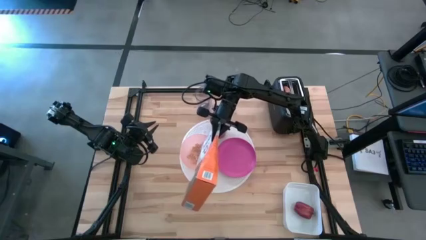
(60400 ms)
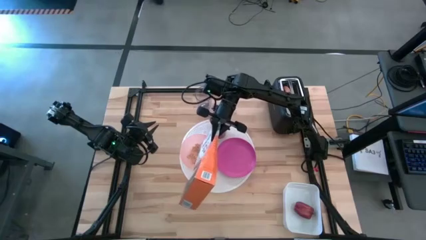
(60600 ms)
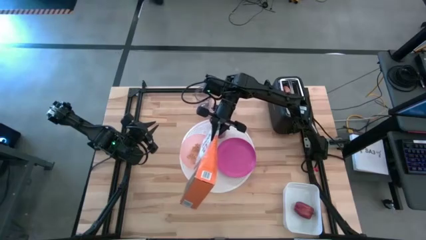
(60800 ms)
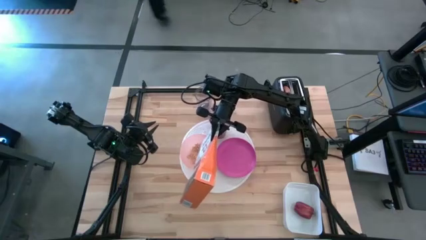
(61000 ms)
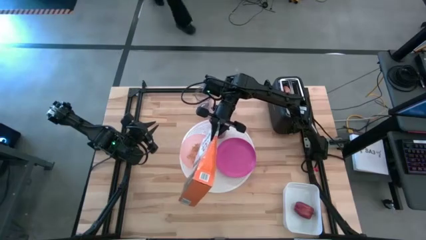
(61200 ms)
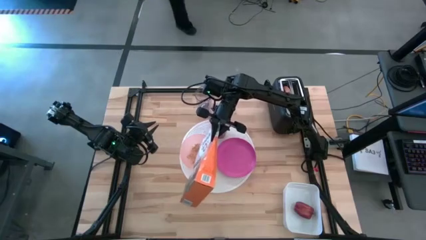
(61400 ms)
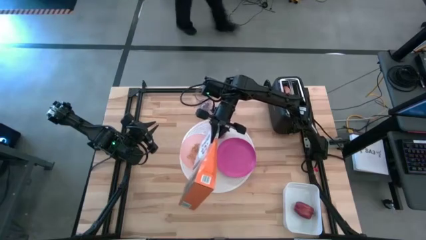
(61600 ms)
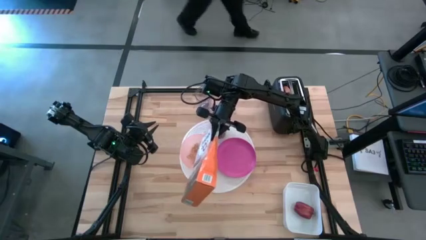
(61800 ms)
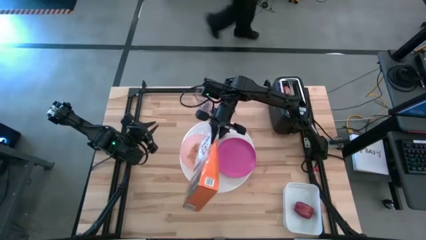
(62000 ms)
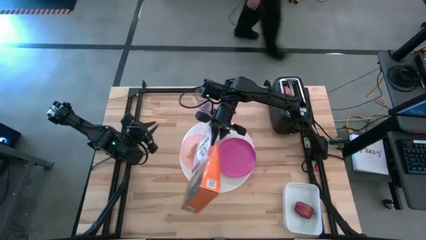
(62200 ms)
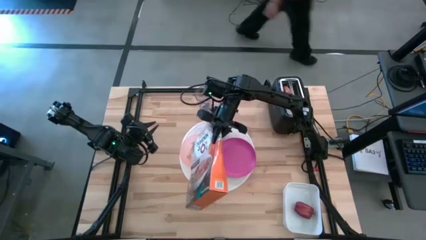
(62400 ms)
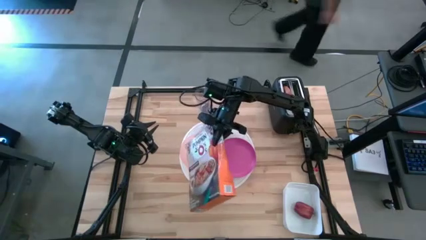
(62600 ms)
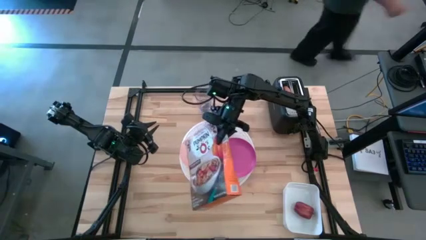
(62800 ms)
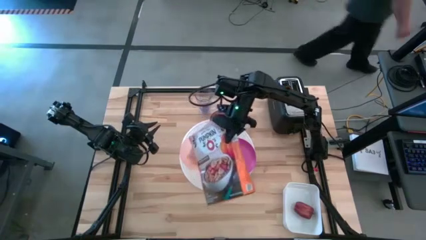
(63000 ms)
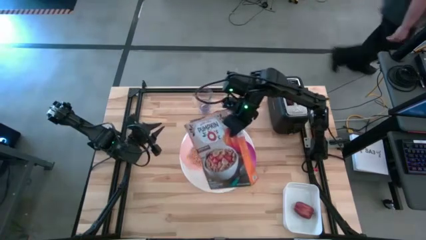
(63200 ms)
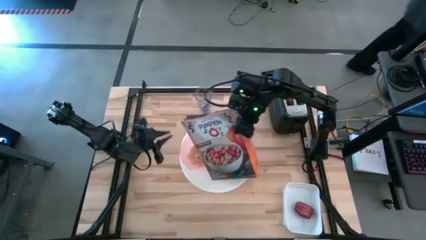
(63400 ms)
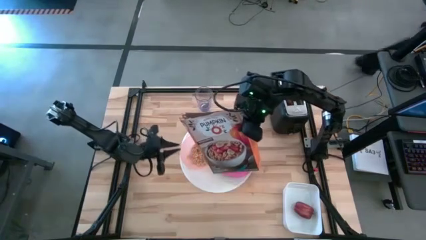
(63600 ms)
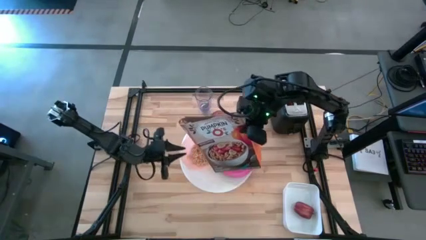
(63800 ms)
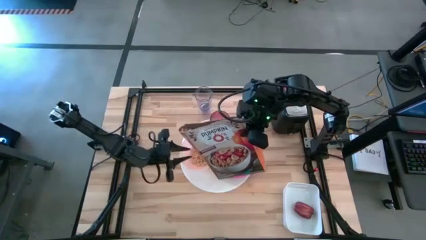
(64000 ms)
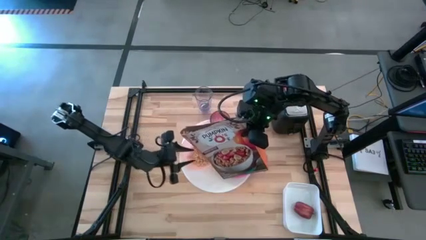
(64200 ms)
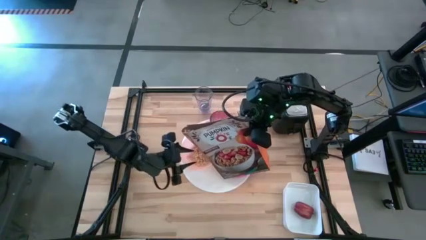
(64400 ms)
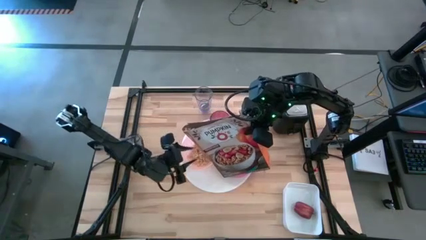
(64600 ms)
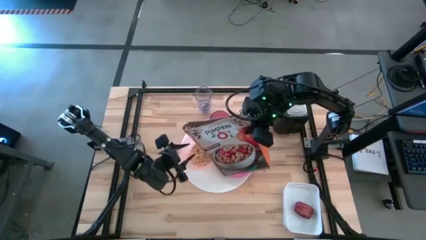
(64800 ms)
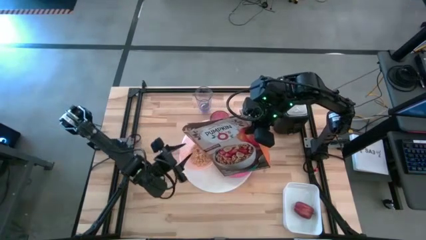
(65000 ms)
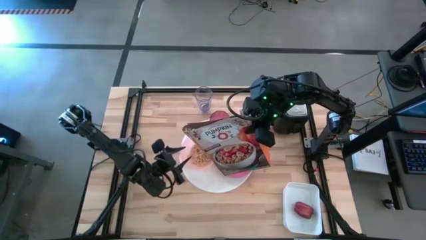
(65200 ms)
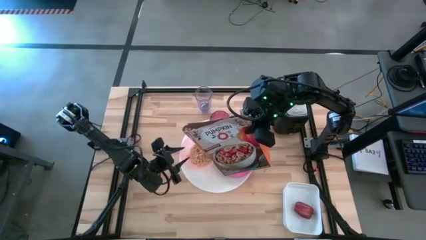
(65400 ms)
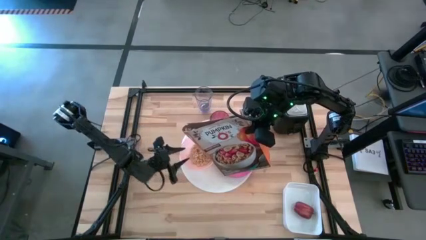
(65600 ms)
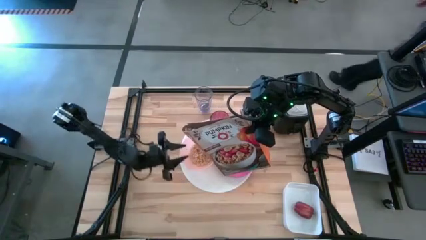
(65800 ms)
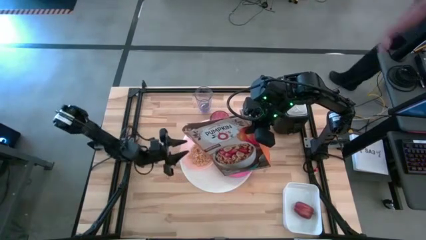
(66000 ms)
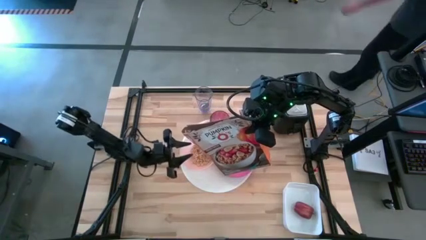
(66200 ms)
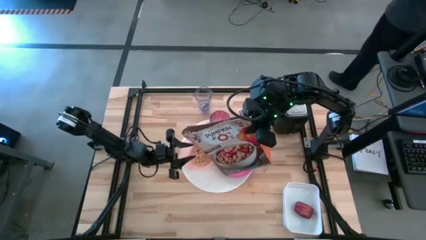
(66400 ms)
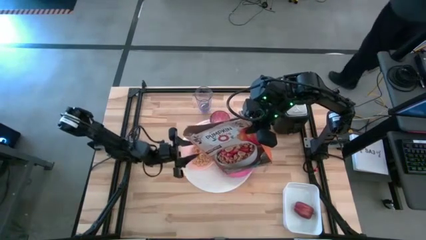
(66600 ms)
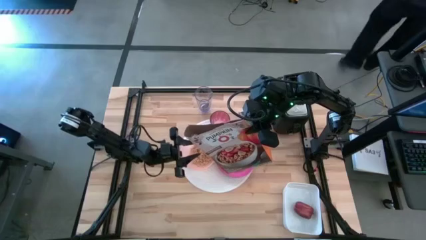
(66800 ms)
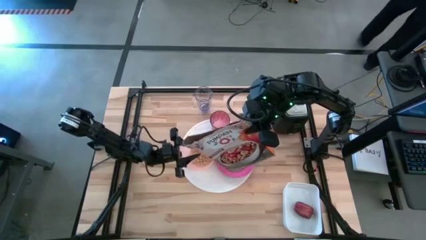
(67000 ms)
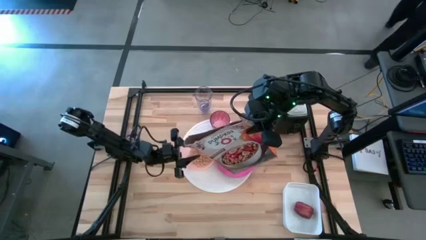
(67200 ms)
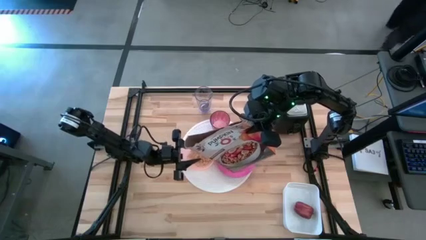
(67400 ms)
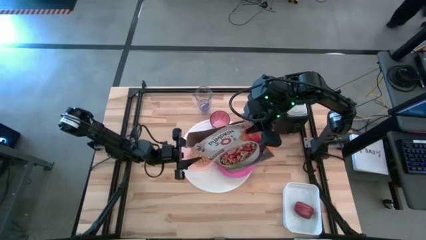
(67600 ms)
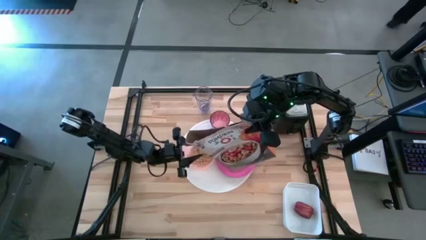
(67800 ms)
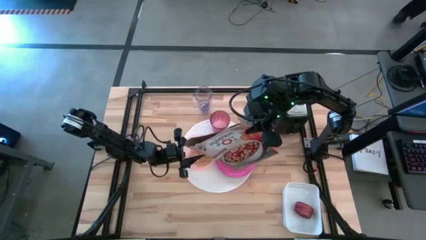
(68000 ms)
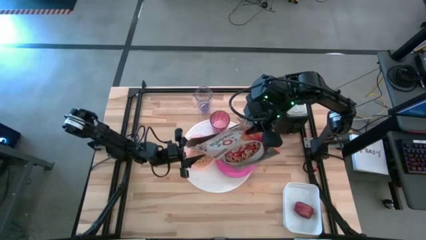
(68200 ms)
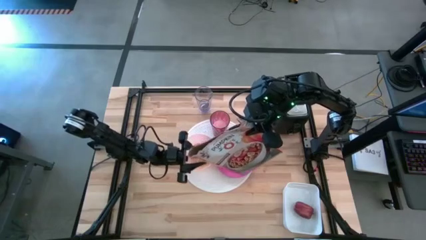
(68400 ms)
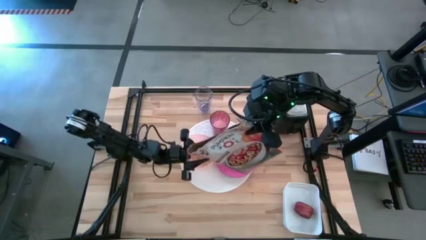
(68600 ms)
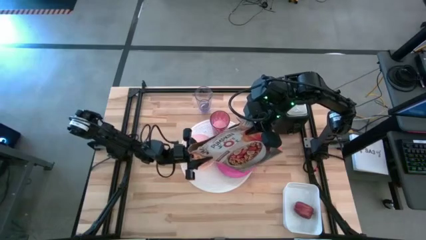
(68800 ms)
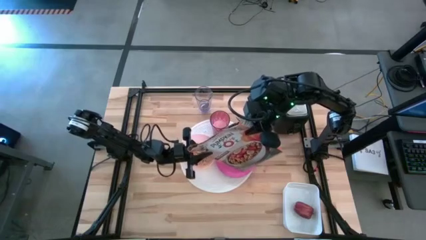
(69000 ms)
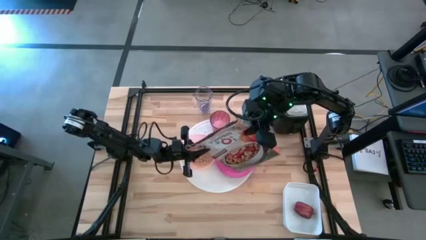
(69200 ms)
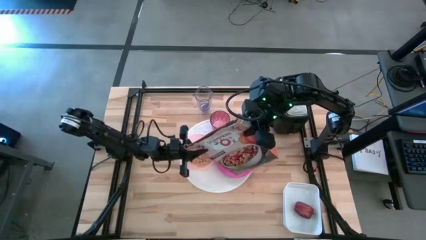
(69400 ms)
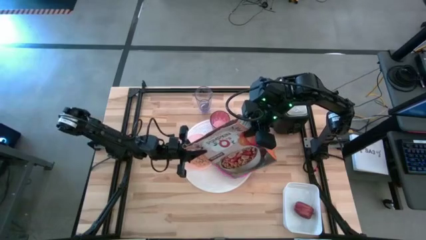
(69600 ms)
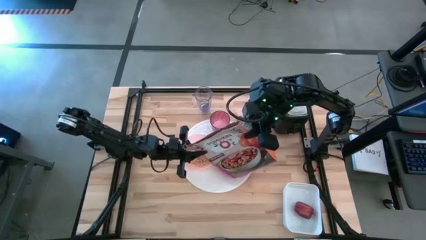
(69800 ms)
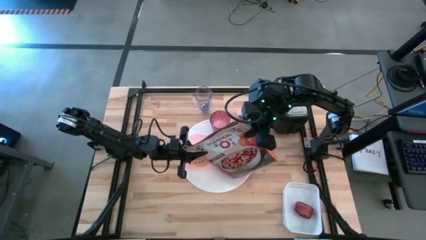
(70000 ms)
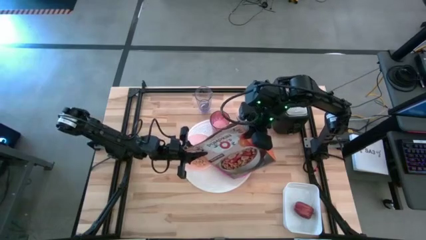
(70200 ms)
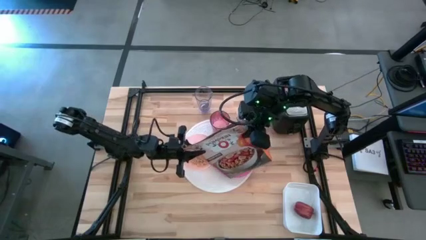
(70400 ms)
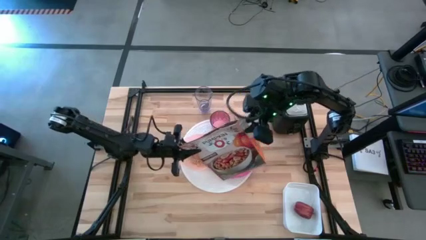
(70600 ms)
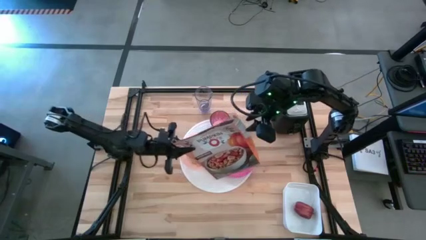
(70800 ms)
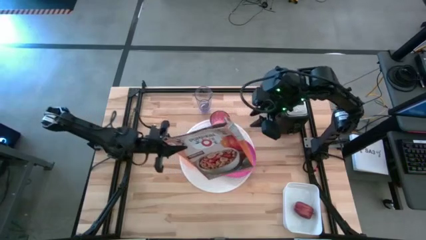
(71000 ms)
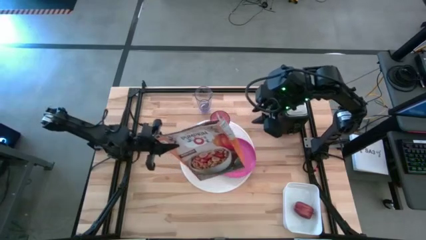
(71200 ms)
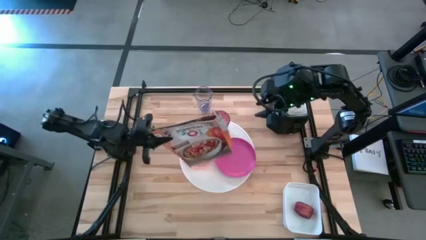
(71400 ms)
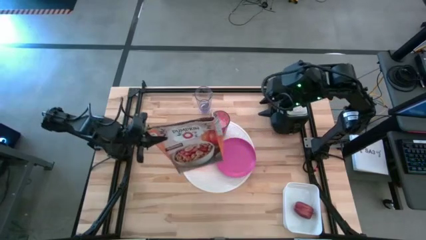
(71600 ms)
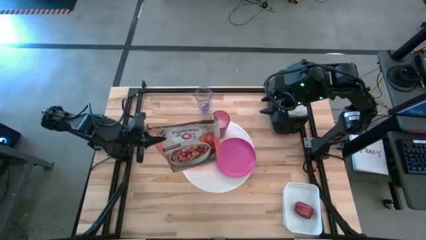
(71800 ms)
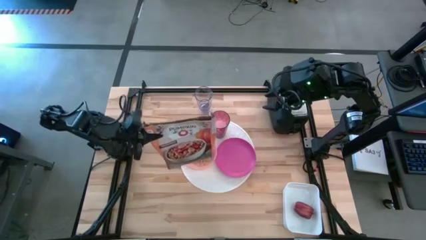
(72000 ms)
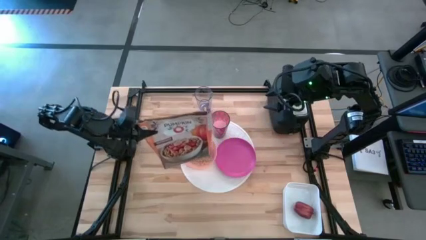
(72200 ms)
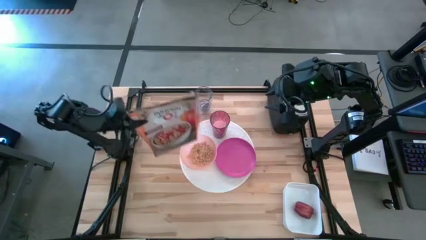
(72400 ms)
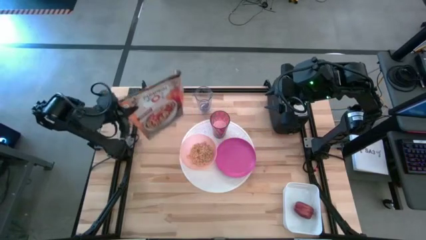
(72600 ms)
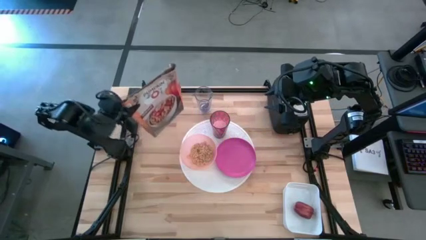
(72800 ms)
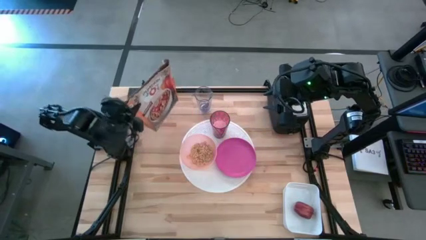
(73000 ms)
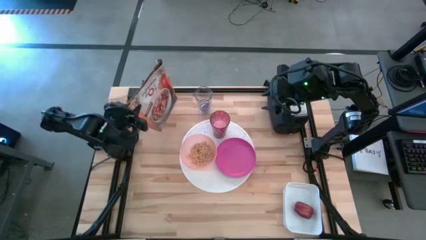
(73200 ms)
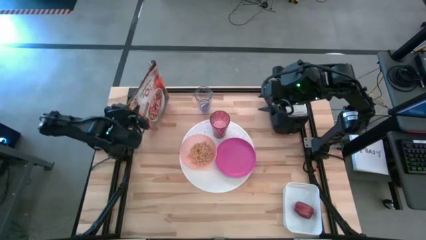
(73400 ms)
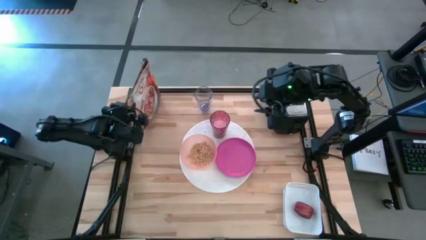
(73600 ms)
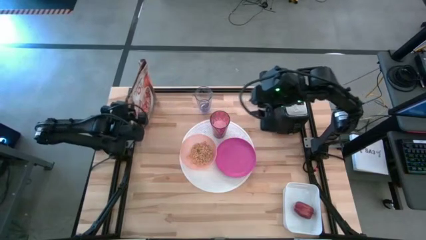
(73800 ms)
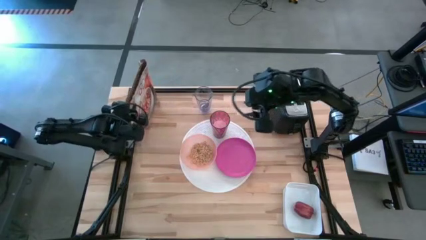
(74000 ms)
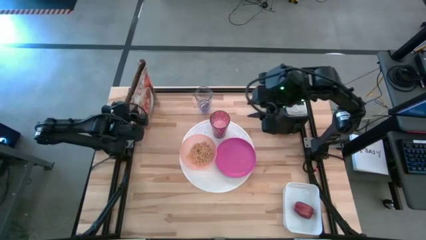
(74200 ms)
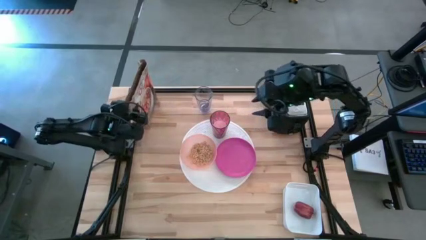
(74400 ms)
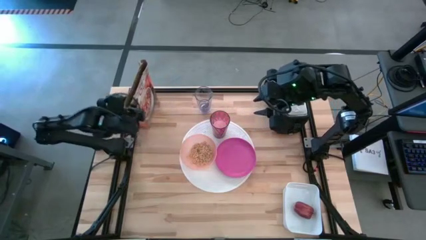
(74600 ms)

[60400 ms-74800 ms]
Task: Arrange a breakfast setting
Pour the cereal into the orange bowl
